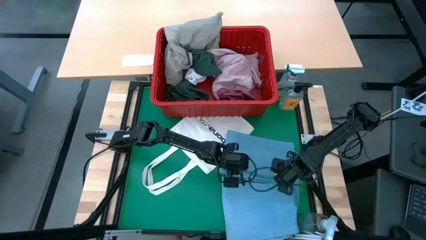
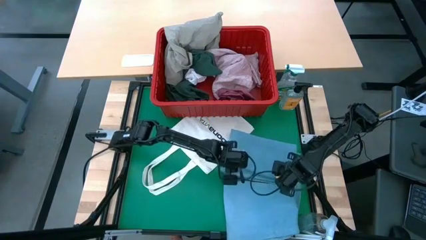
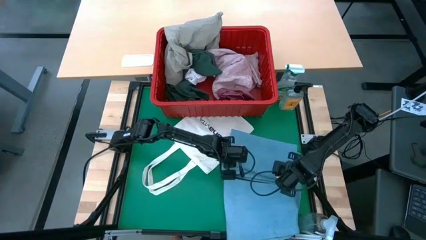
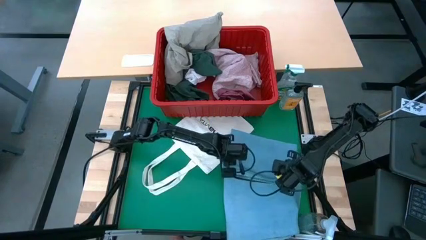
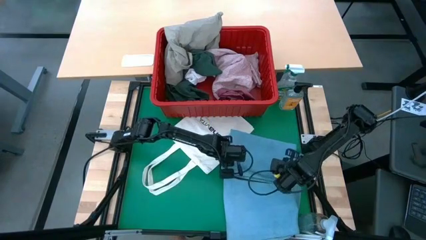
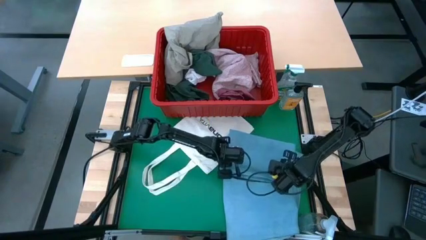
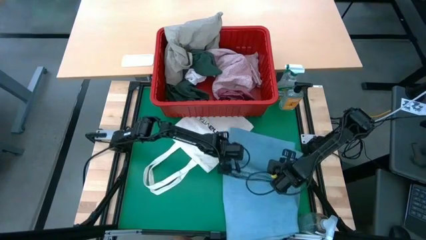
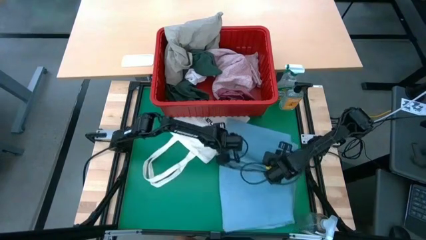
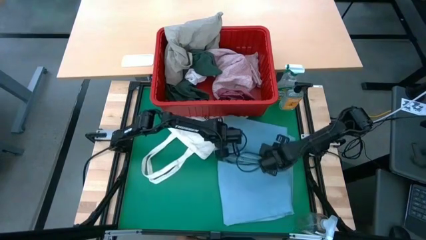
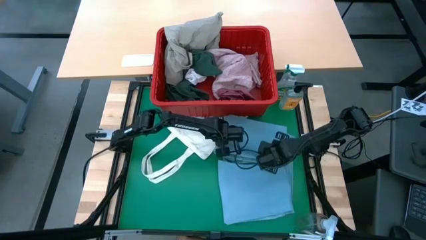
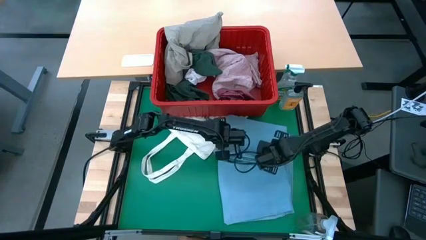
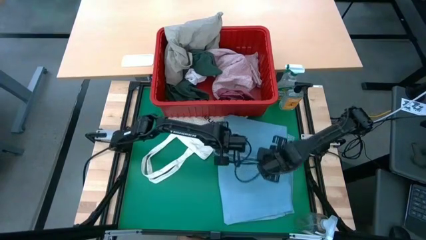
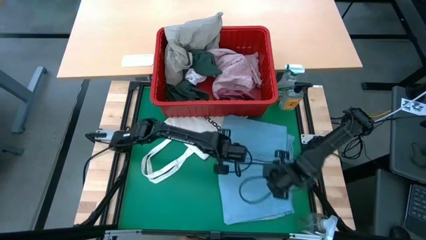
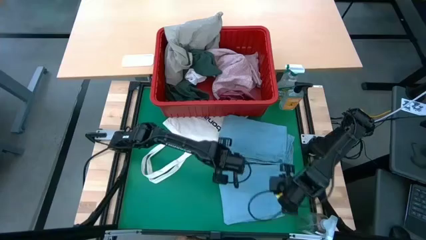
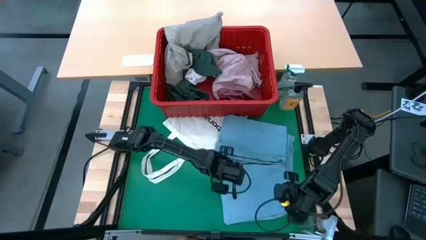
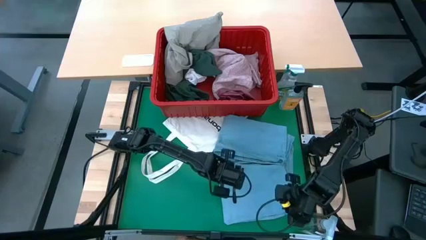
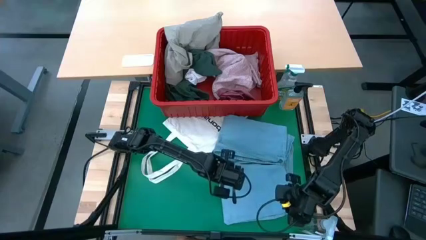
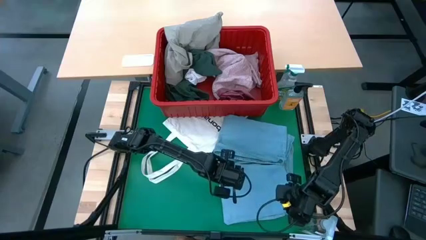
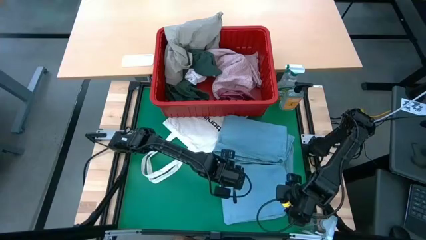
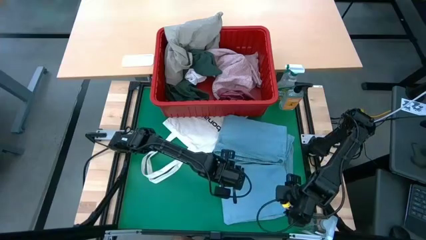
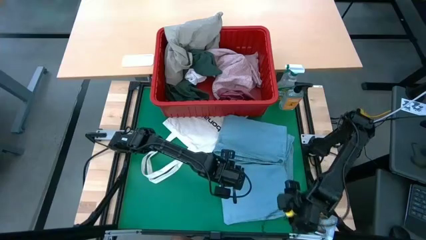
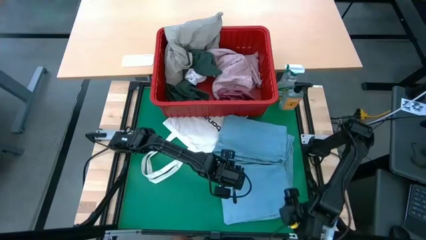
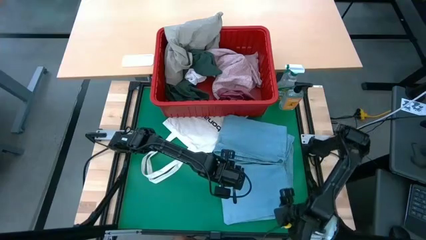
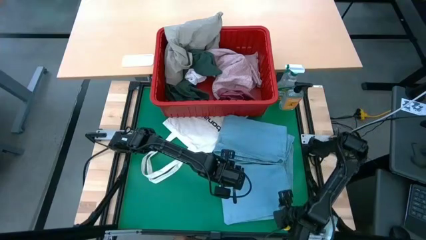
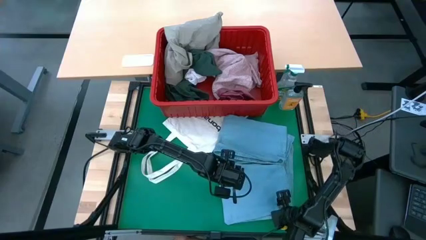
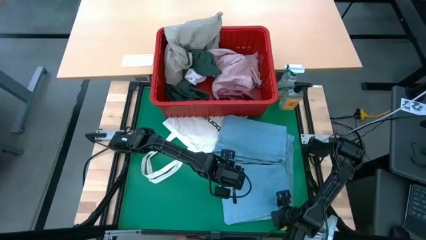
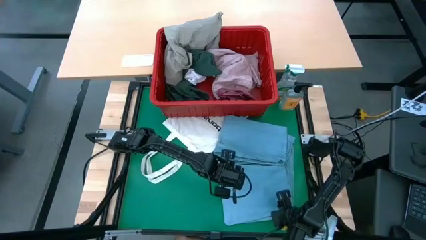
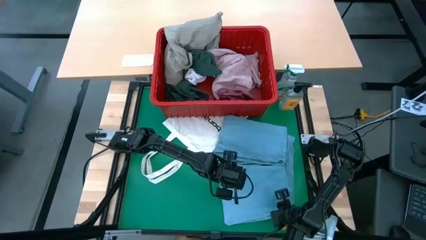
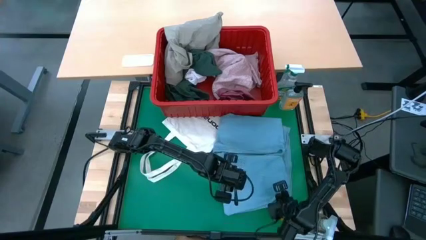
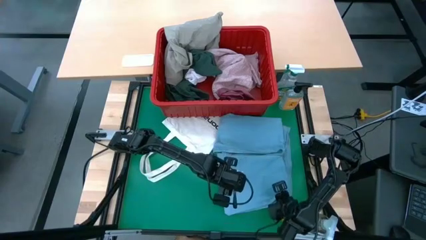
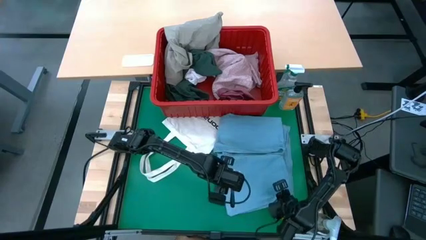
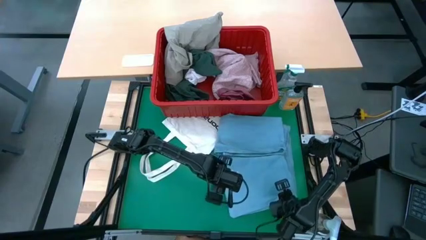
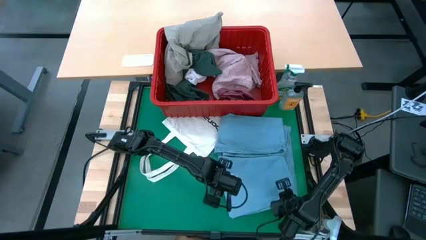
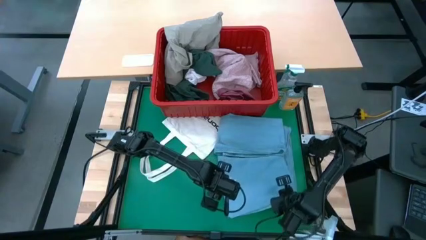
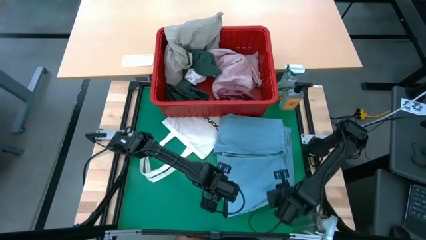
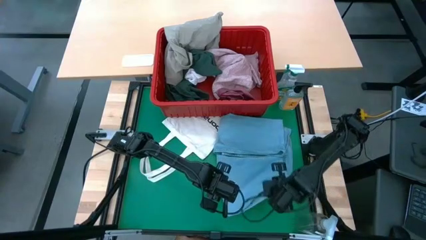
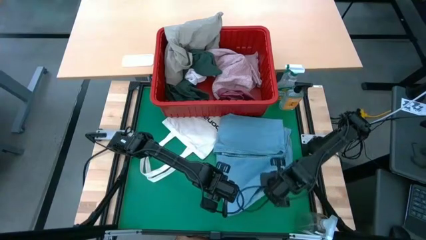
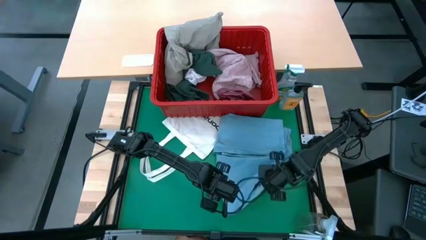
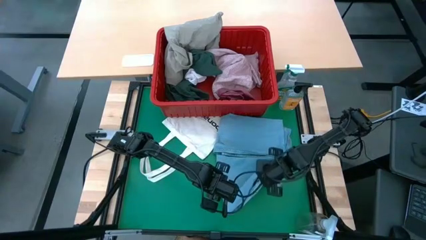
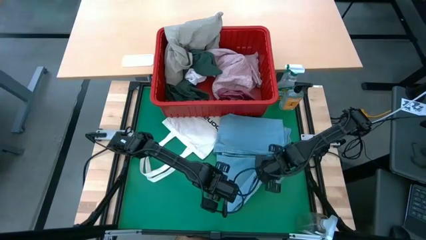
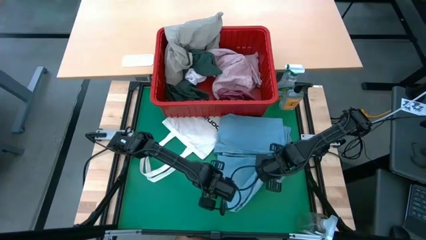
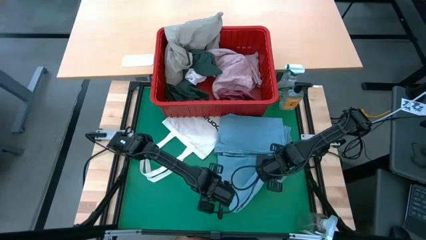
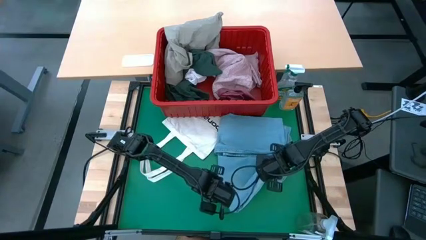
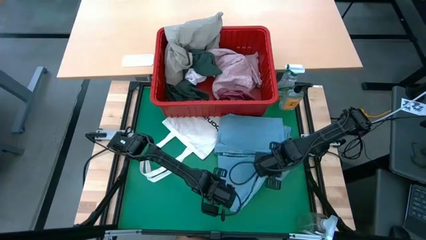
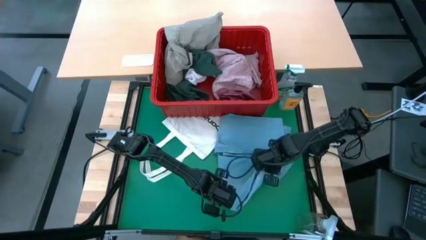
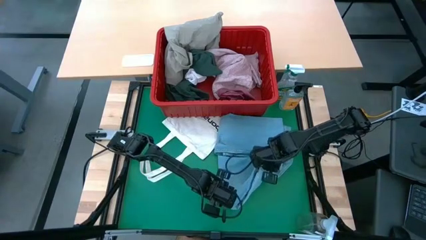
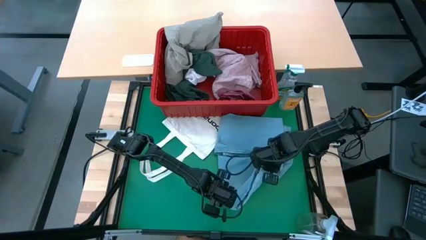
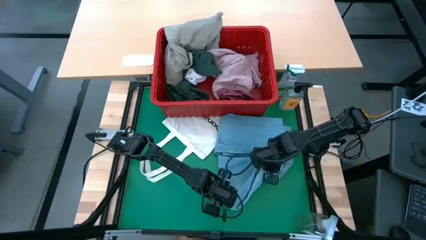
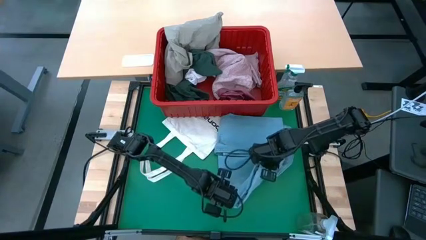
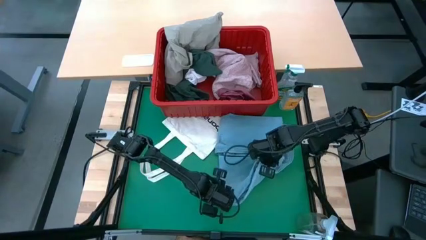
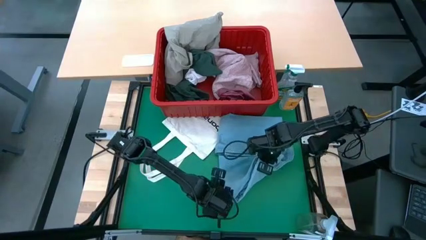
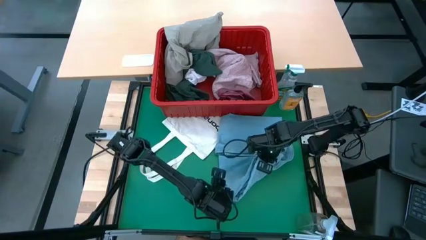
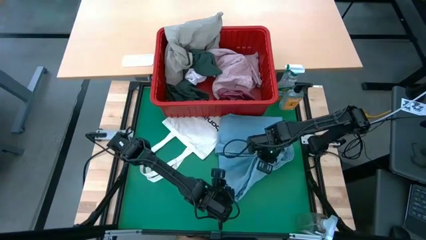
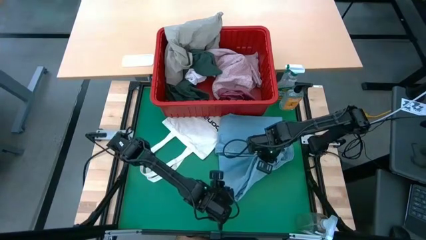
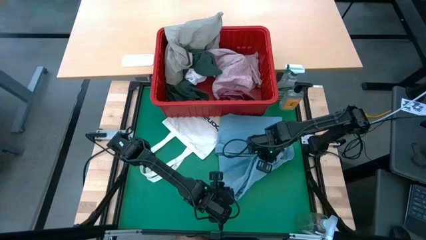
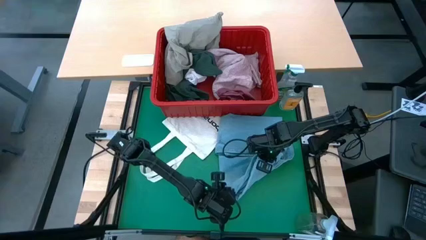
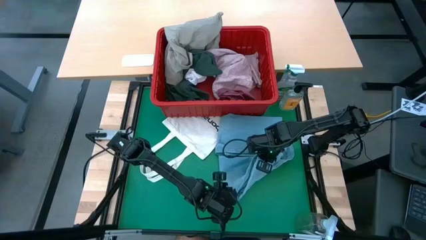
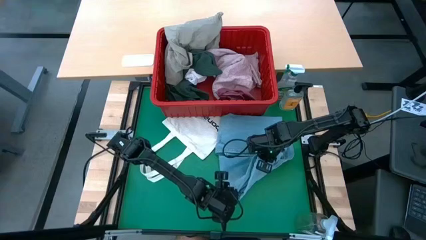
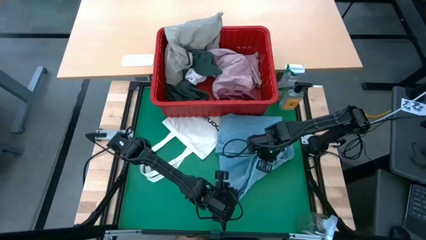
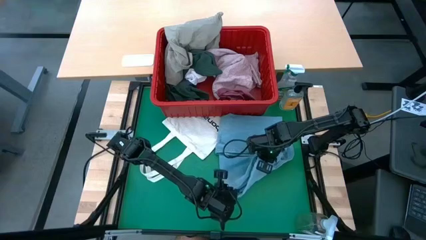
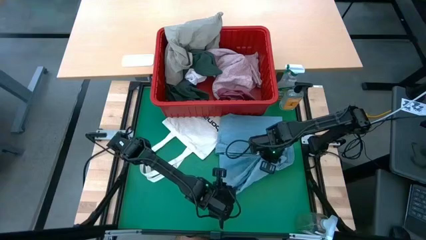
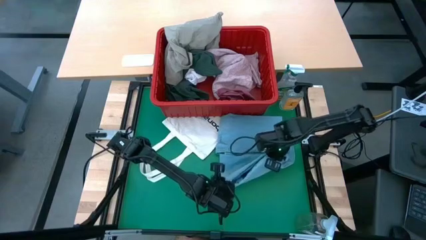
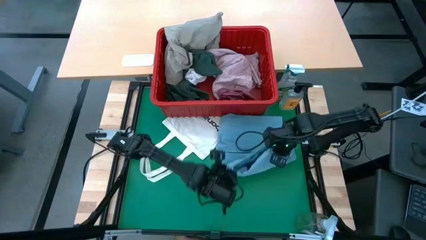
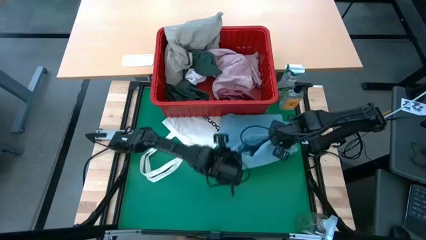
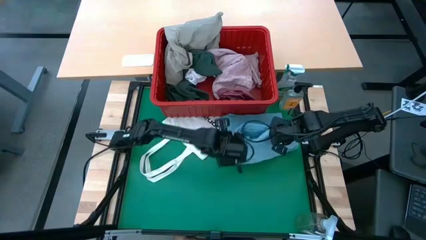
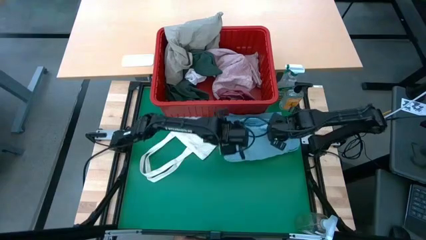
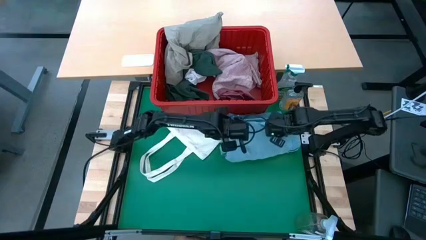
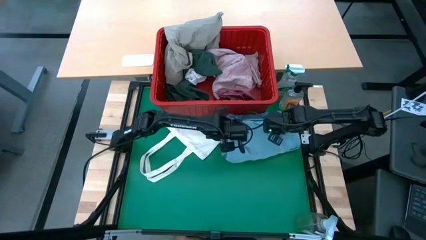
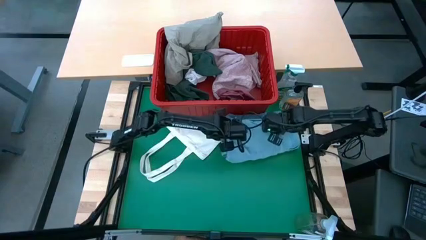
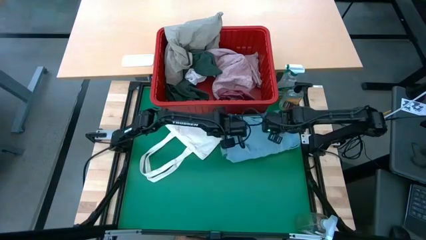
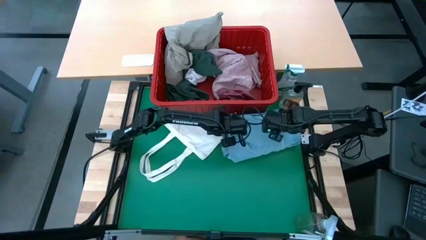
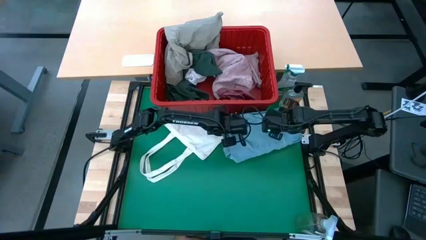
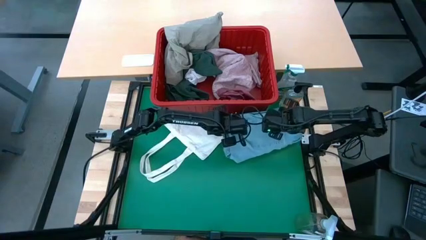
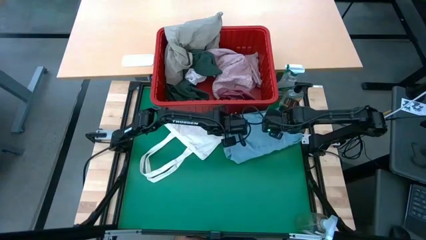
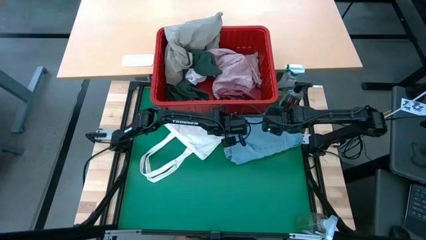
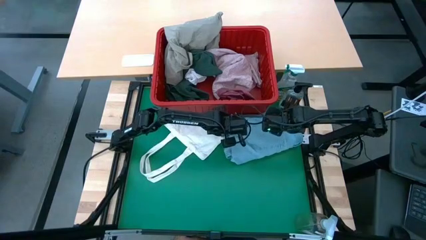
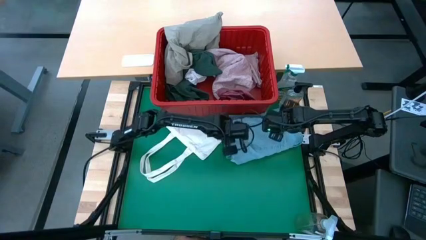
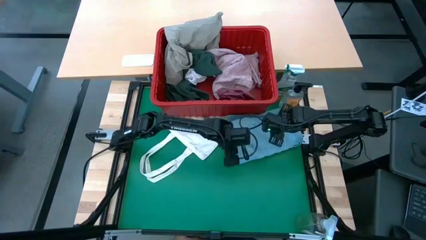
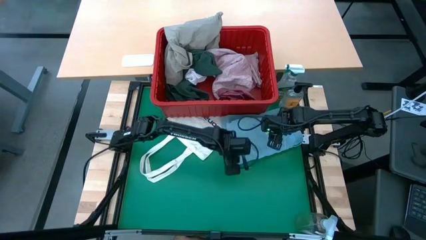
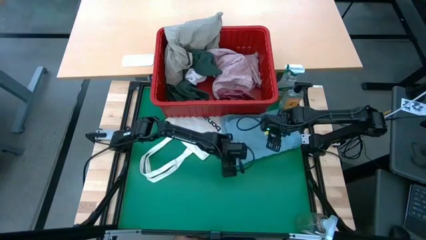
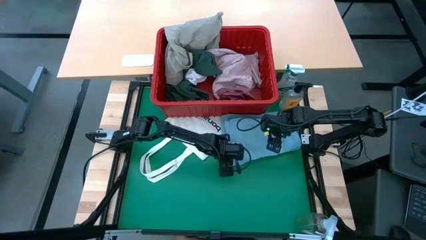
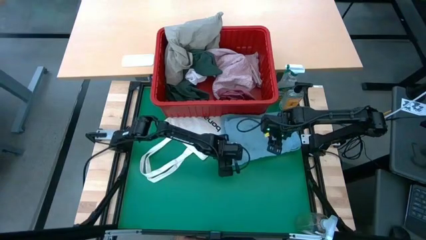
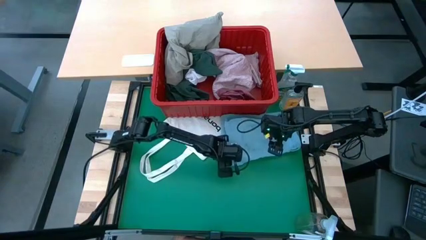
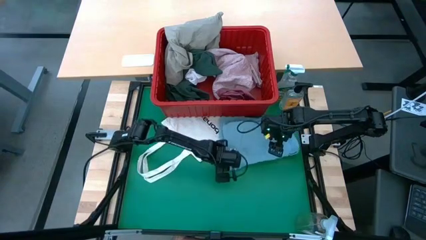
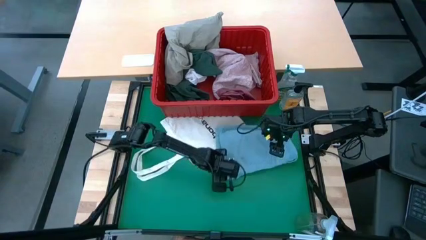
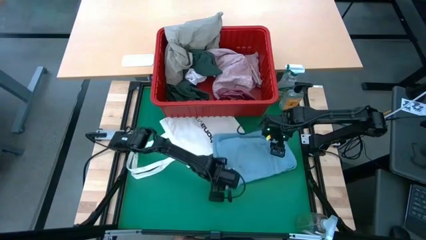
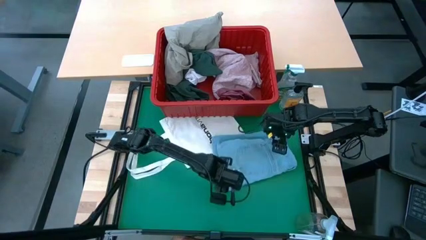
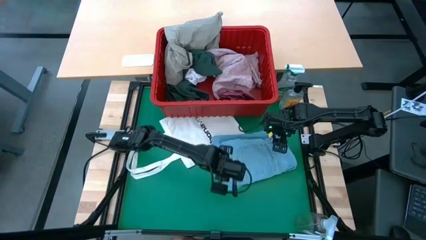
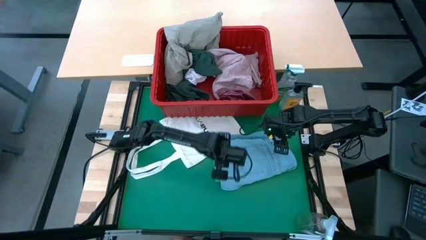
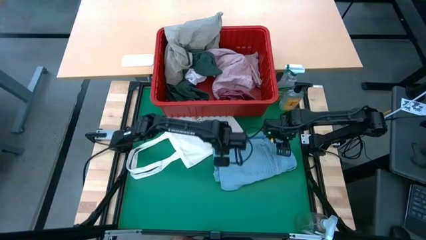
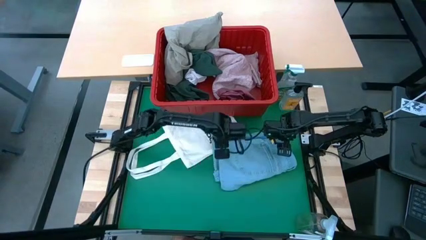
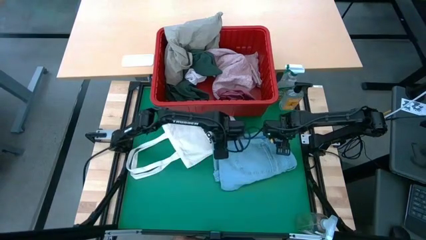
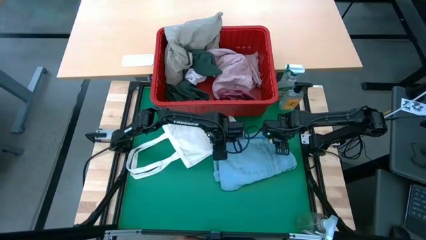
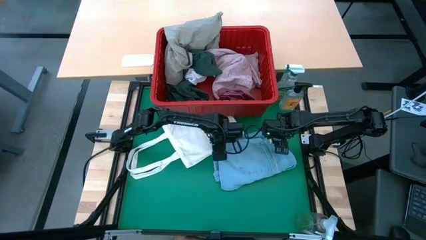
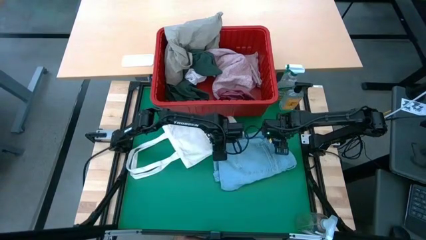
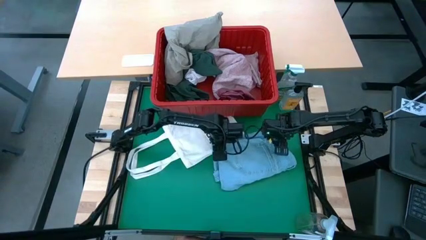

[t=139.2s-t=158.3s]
Task: Fold laundry
Fold the blue jeans
